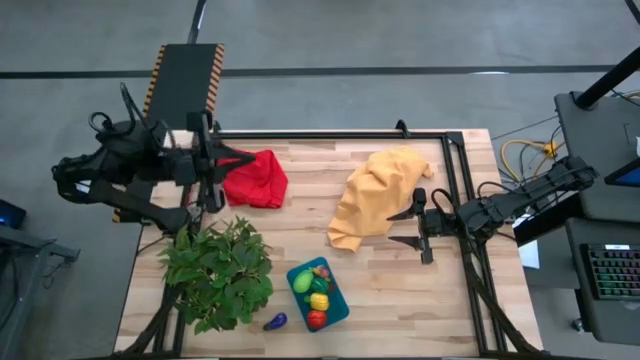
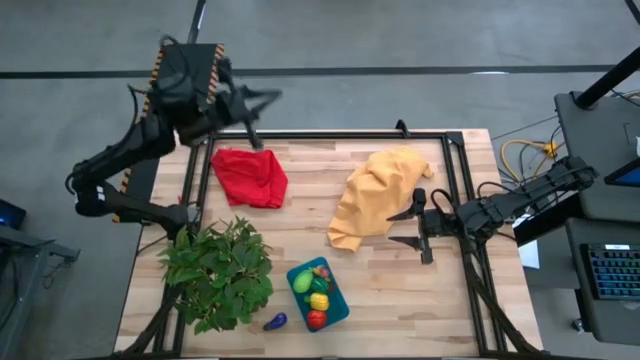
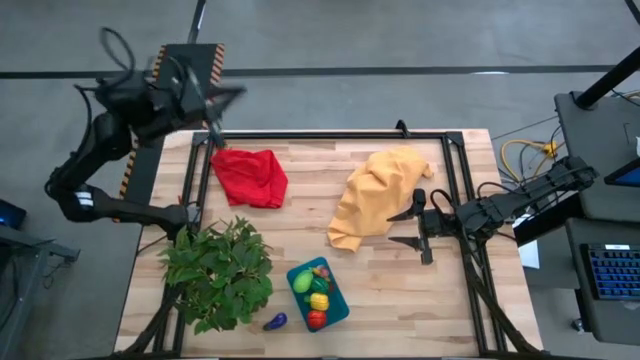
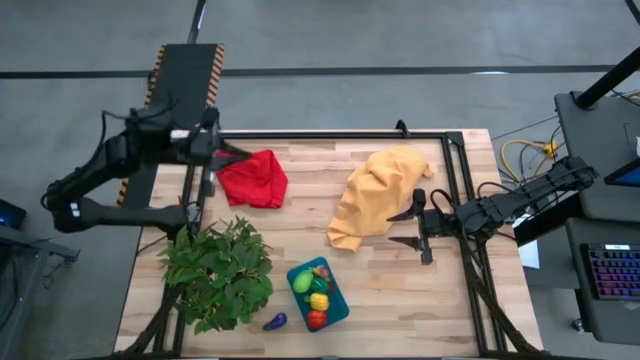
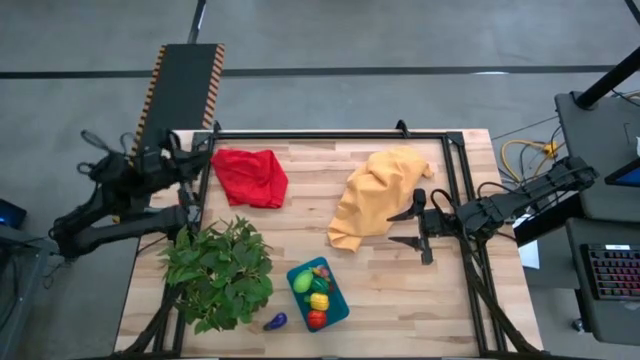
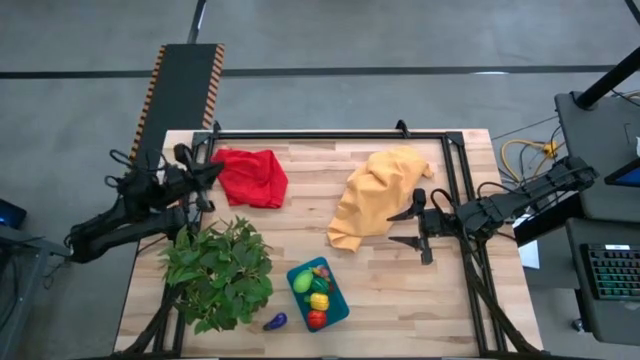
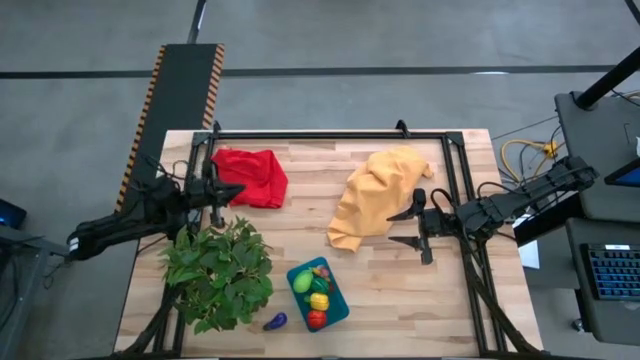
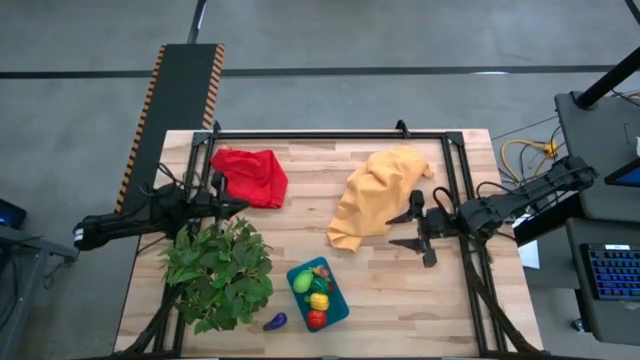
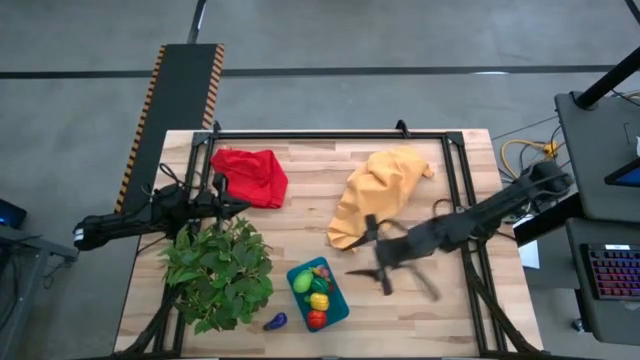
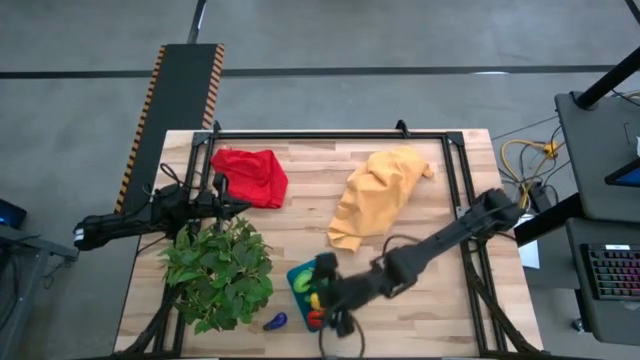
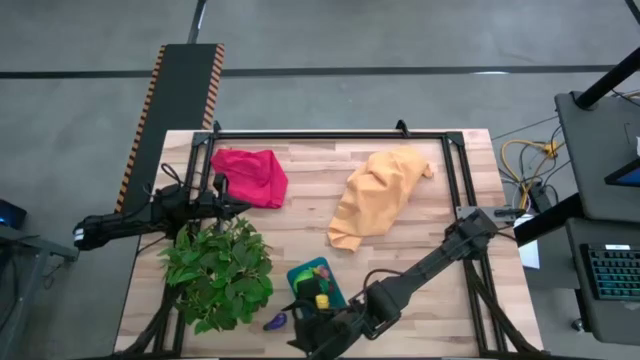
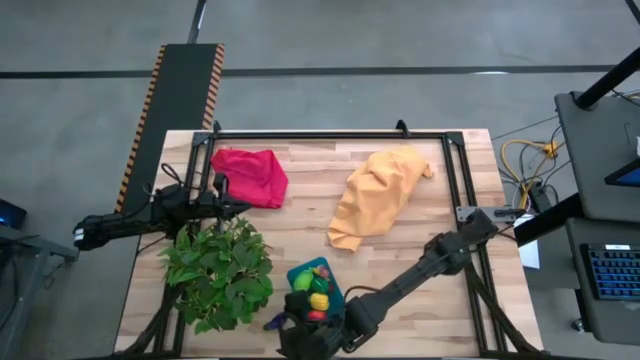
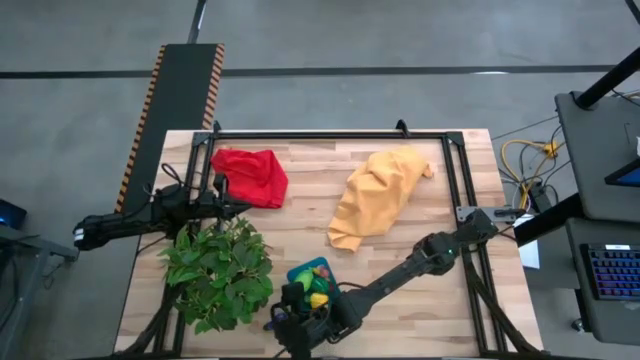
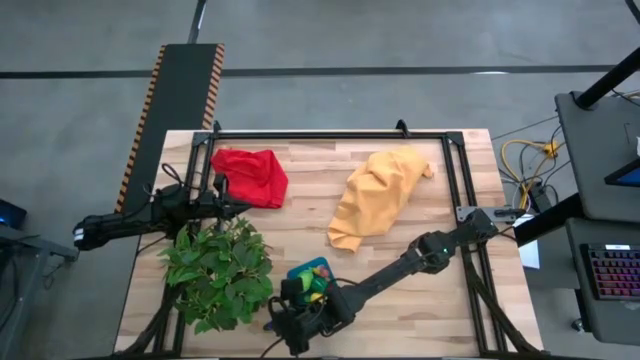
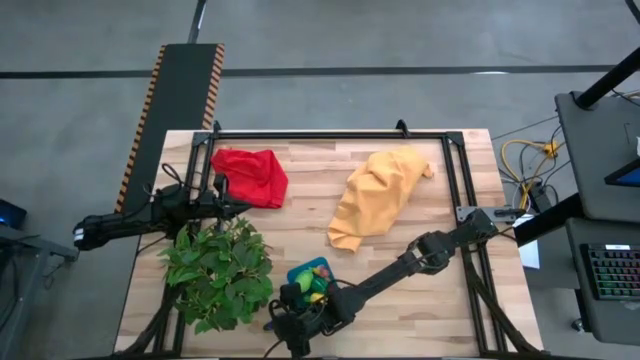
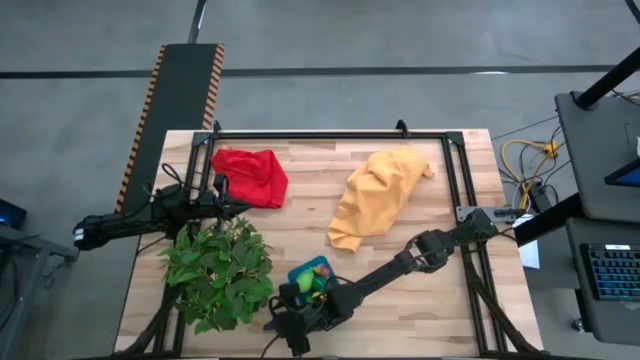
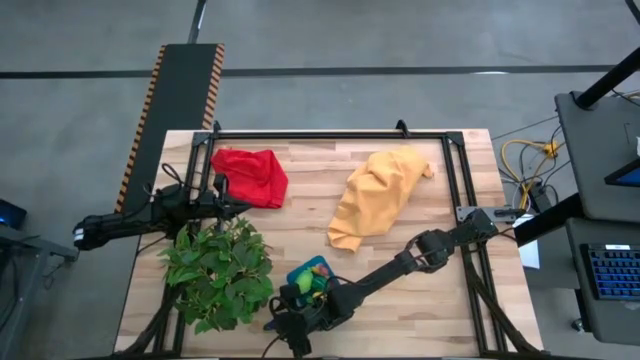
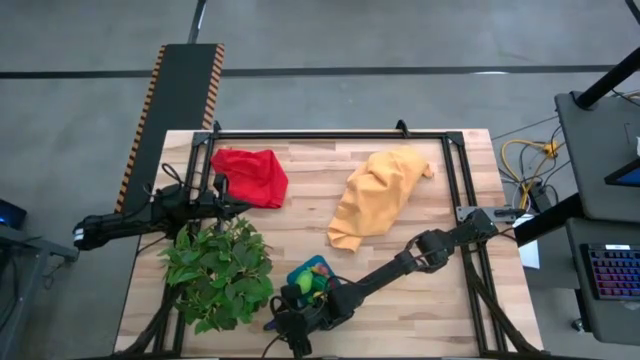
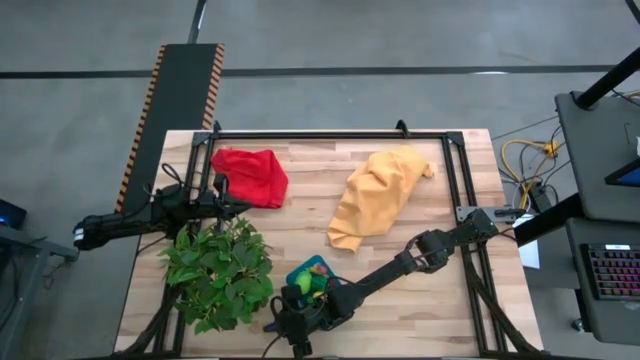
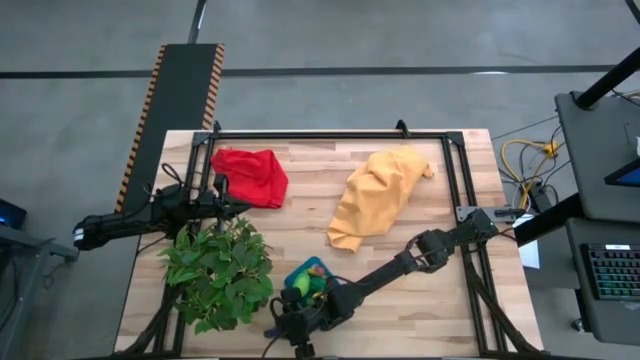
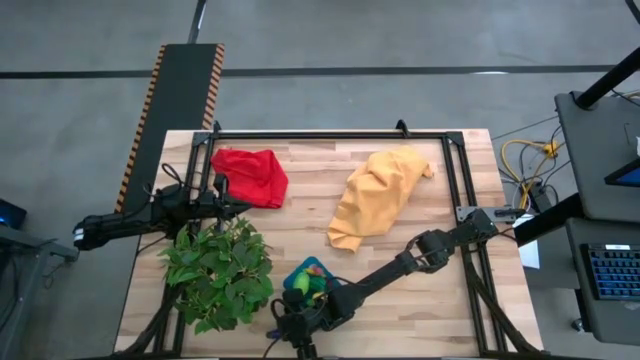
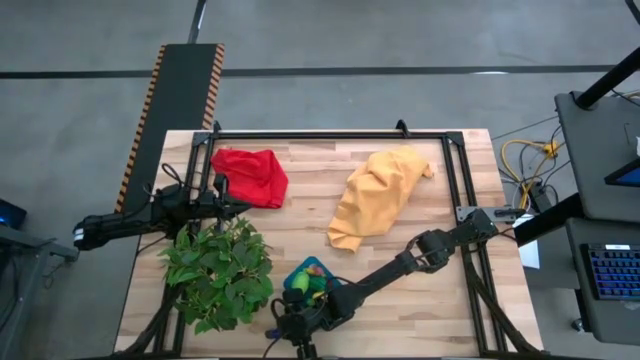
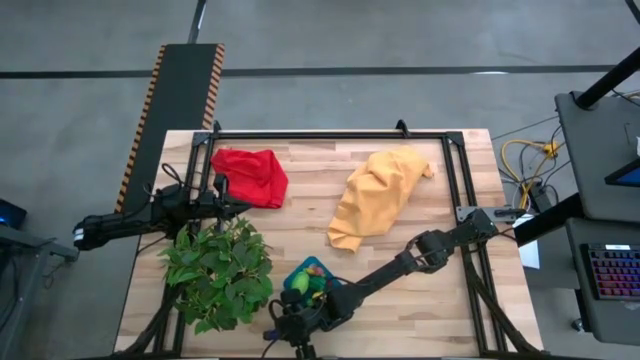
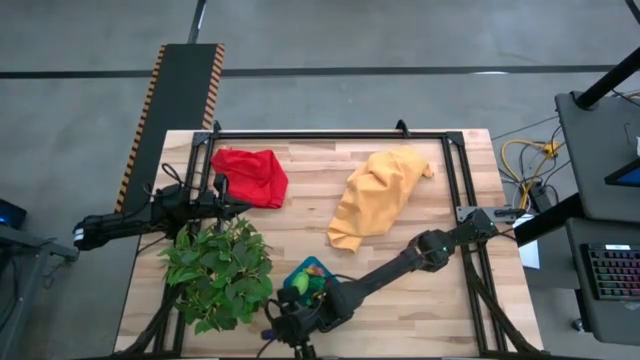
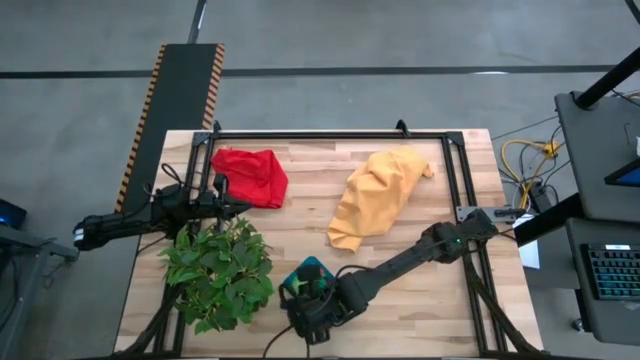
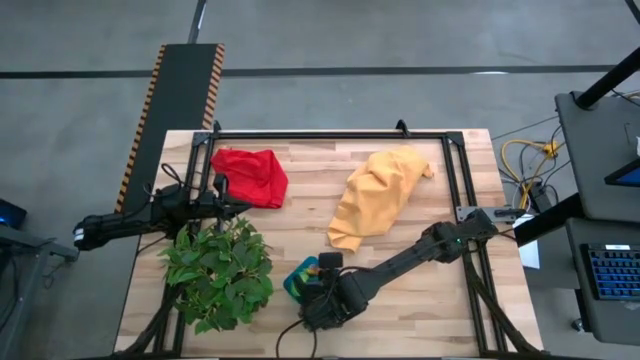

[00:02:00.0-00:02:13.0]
Task: Pick and placing Produce into tupperware
Put the eggplant into the bin

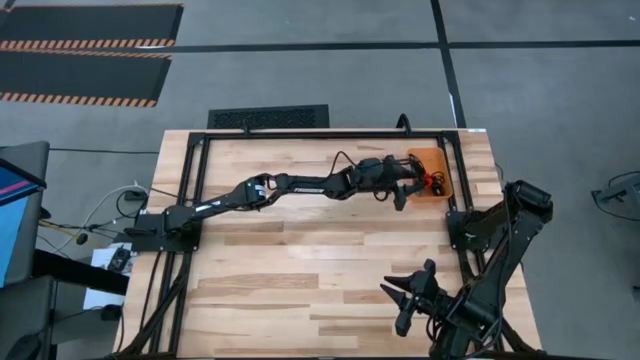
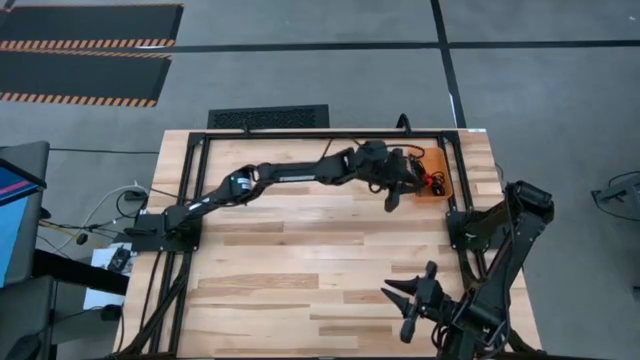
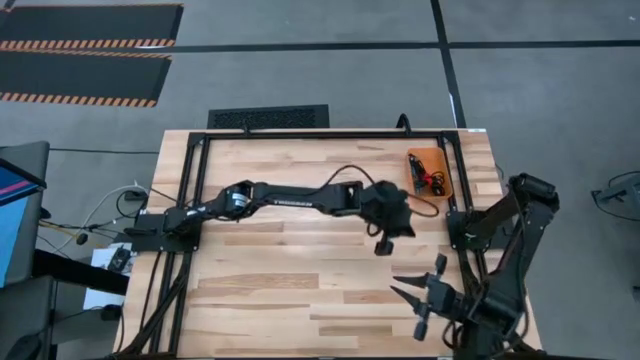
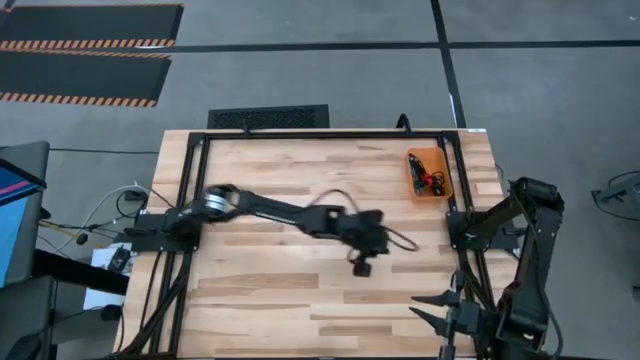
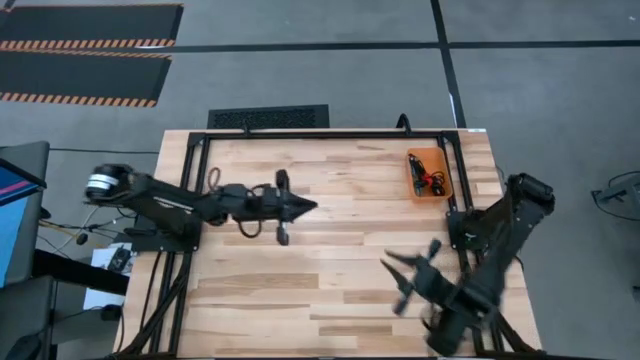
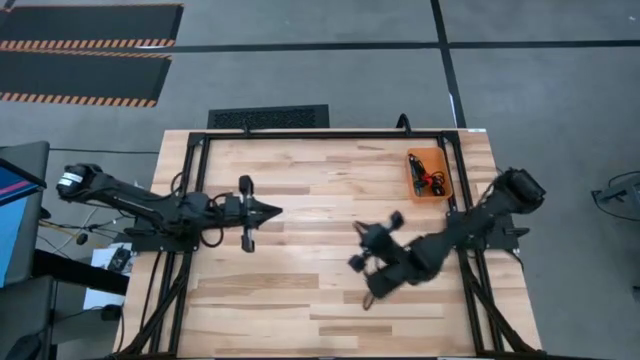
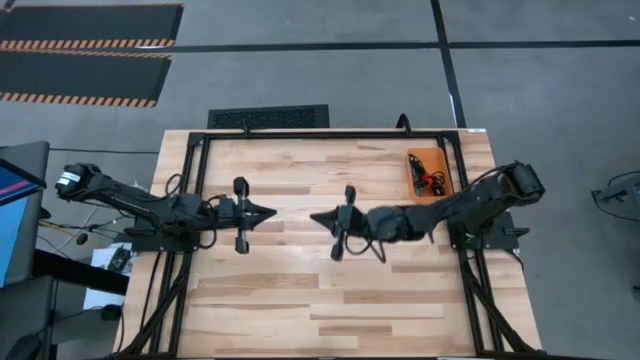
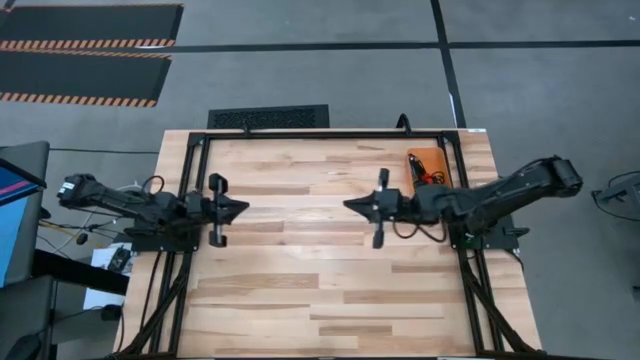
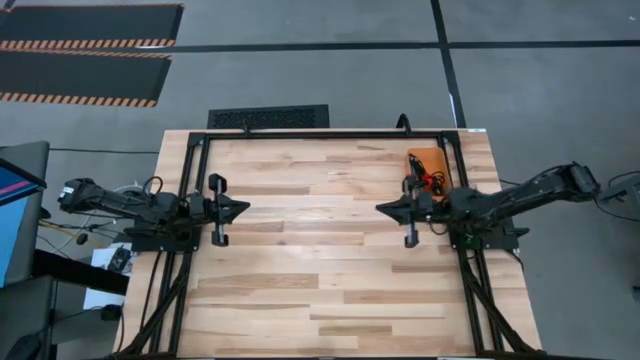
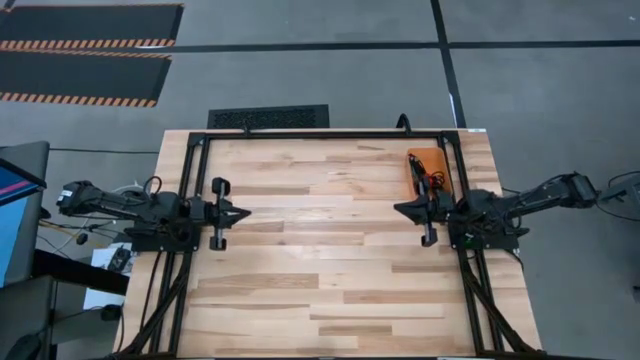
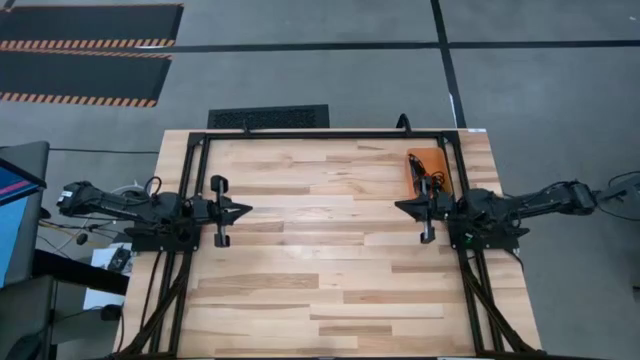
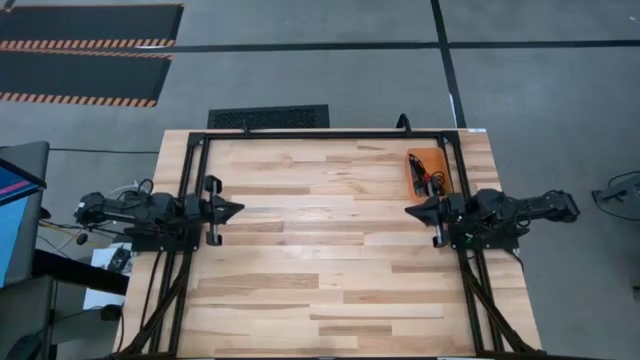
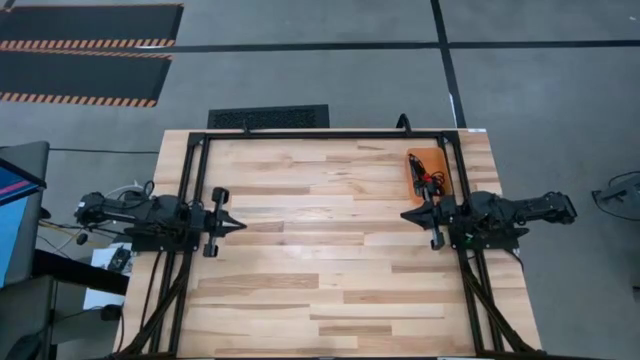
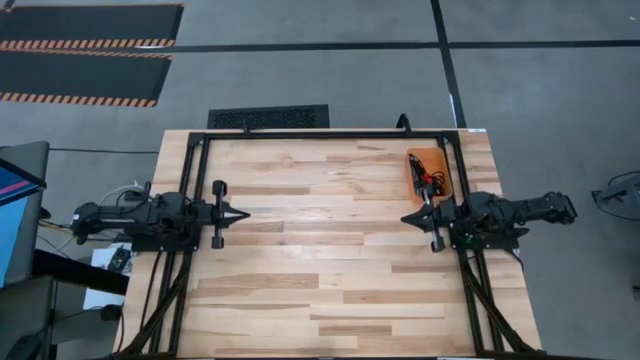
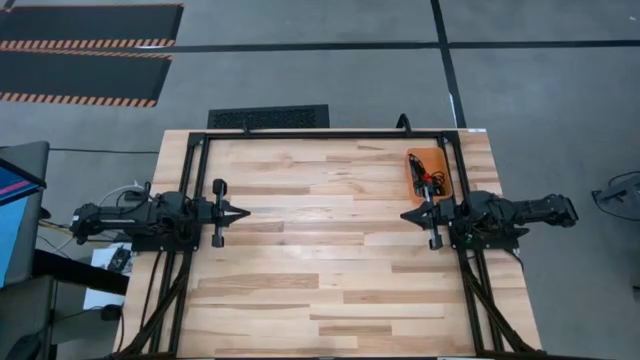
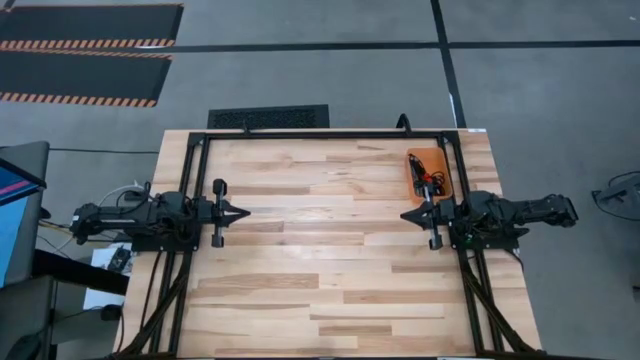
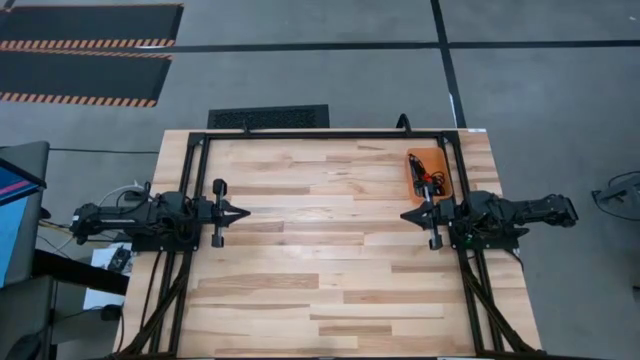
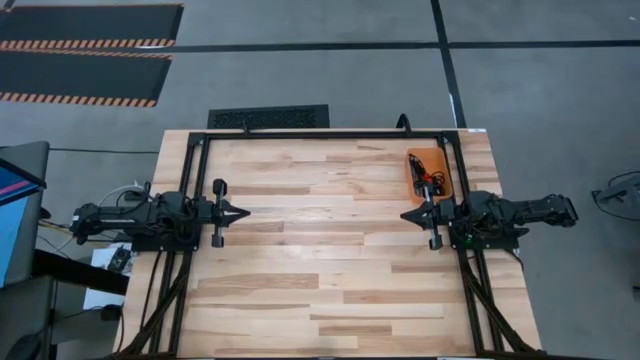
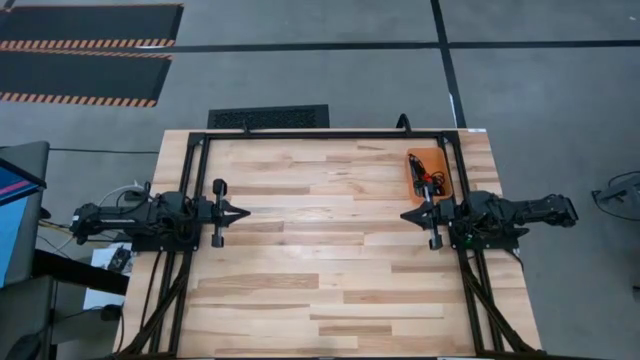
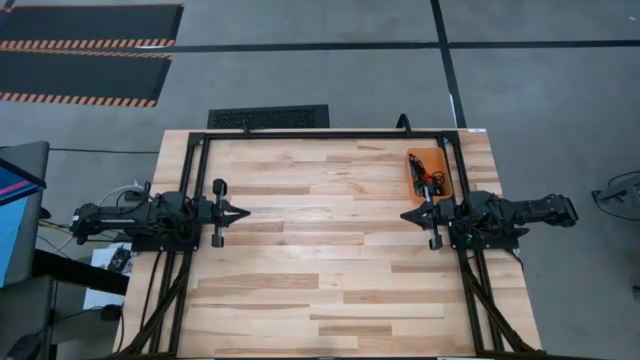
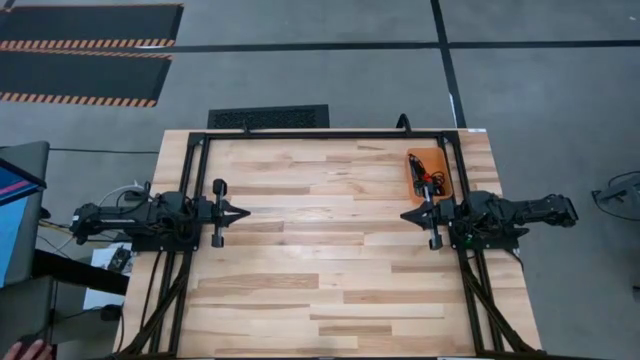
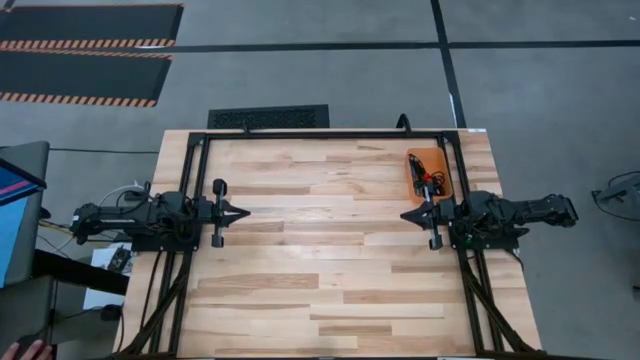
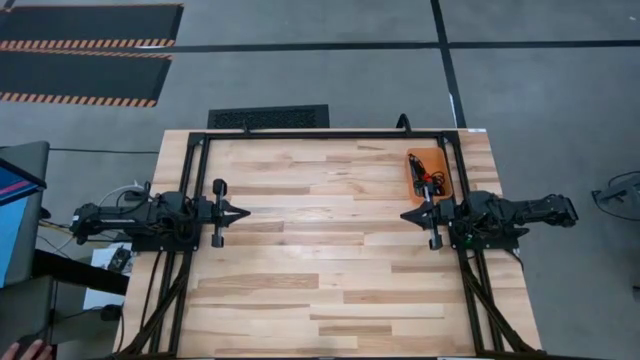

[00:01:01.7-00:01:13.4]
Task: Pick and place USB-C Cables
Return to Home Position
